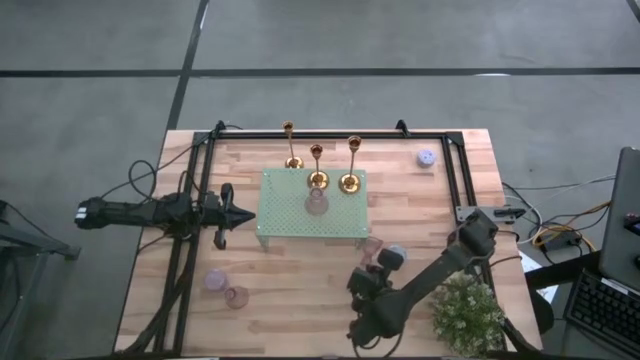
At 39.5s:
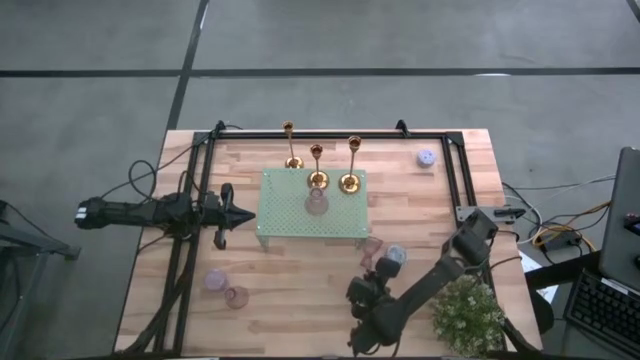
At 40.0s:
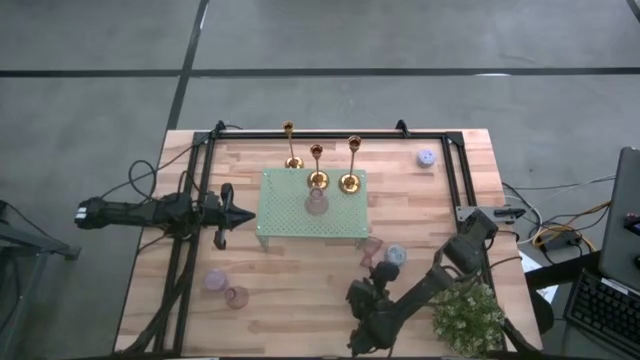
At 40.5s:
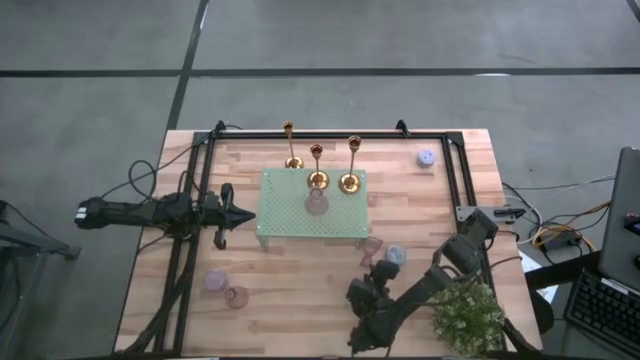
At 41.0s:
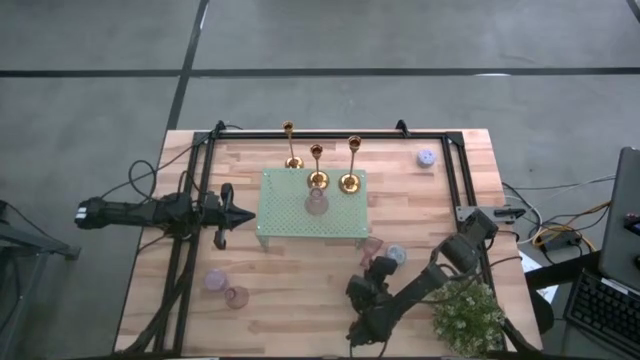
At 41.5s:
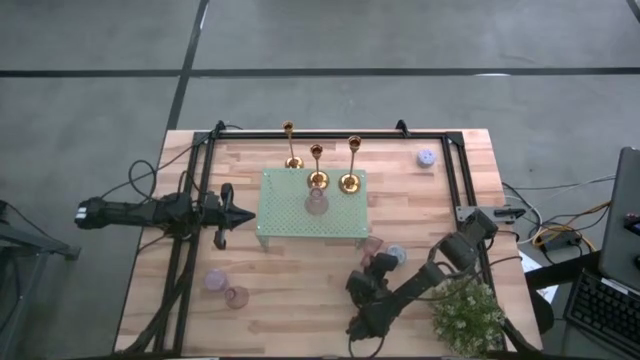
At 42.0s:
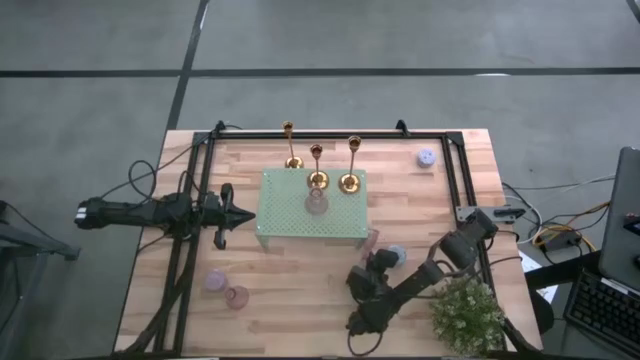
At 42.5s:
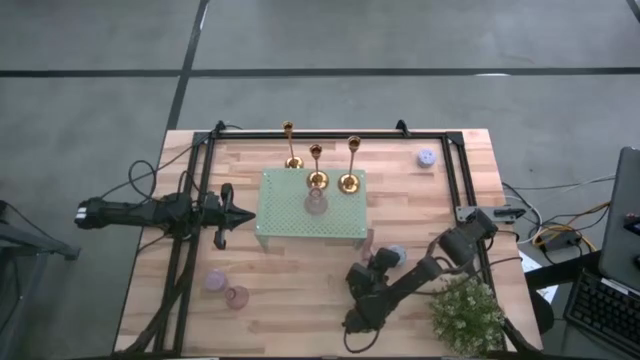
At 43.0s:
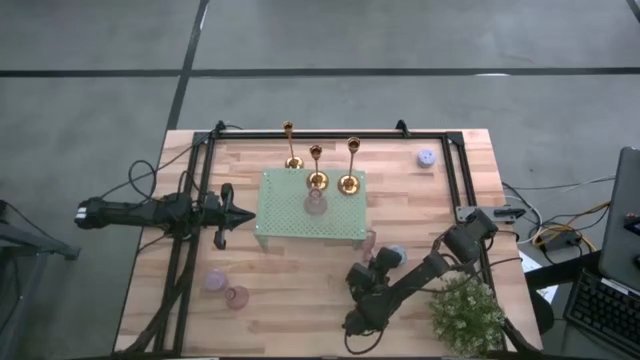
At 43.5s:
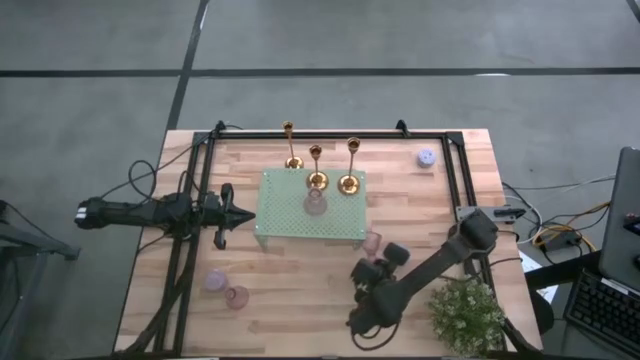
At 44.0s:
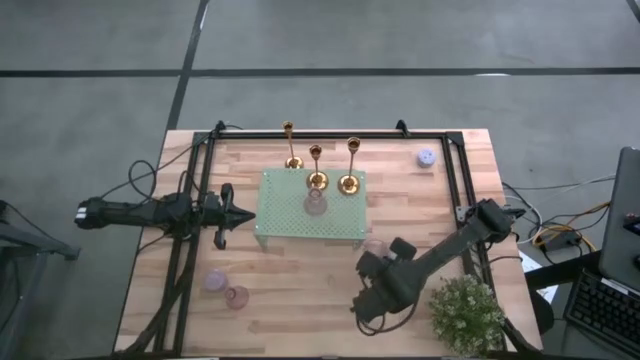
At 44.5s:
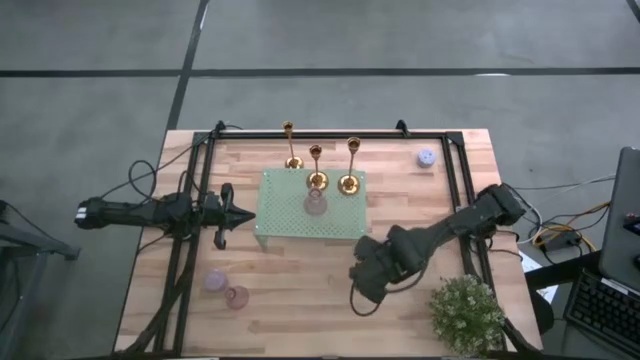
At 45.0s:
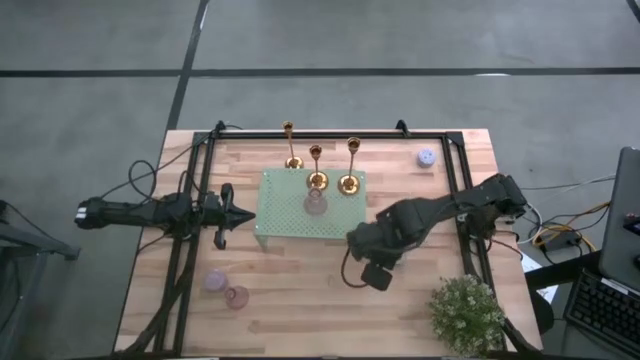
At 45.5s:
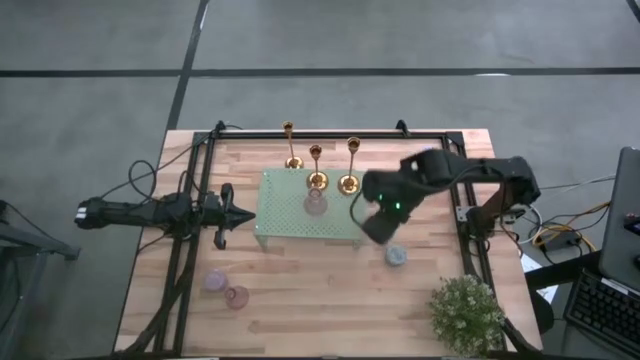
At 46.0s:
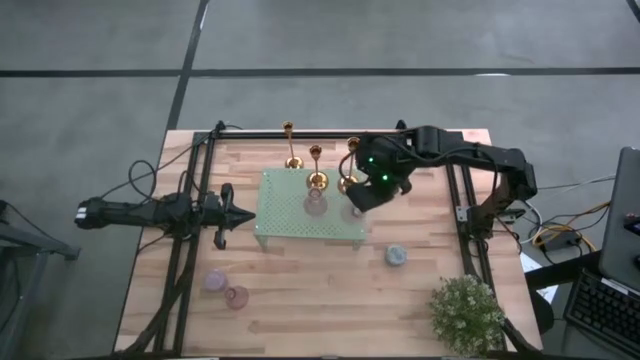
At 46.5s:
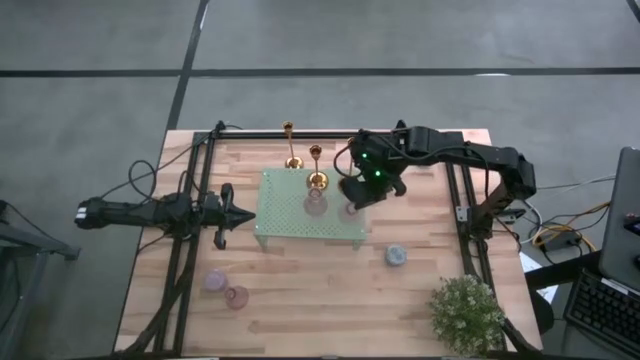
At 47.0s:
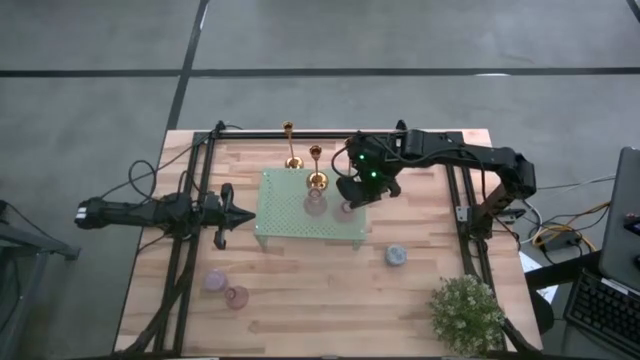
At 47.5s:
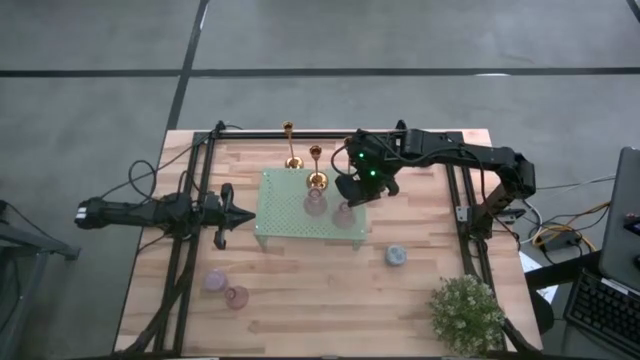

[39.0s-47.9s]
Task: Pick & Place candle stick holders
Put the right transparent glass candle holder on the shelf aligned with the other transparent glass candle holder

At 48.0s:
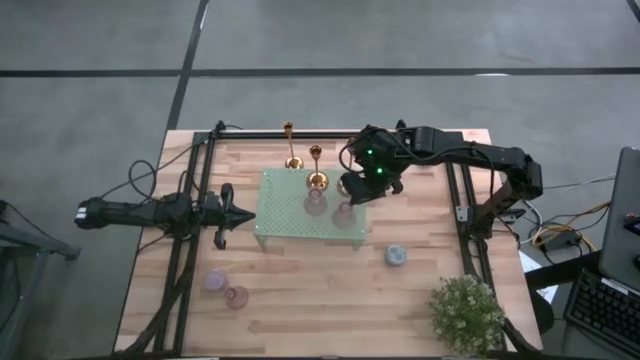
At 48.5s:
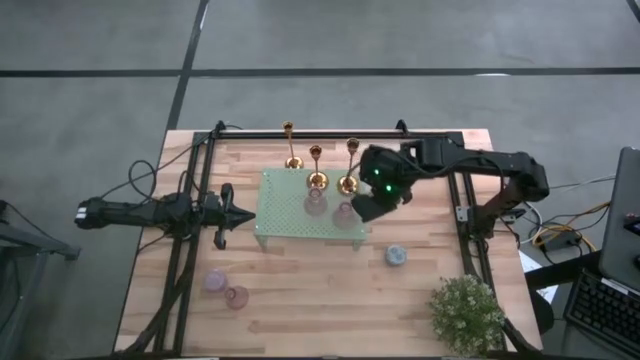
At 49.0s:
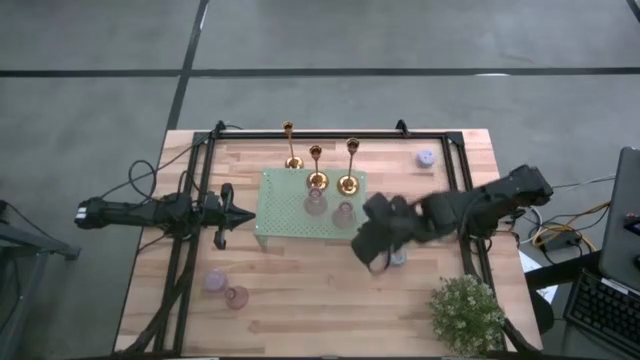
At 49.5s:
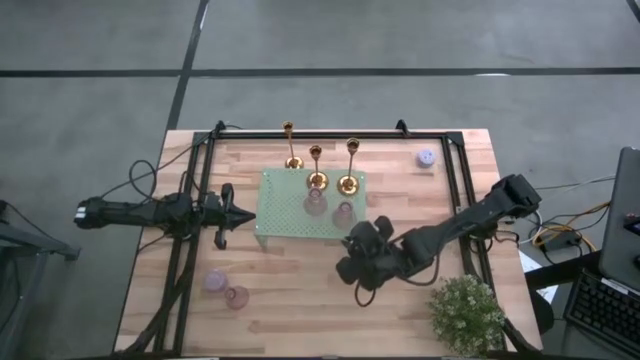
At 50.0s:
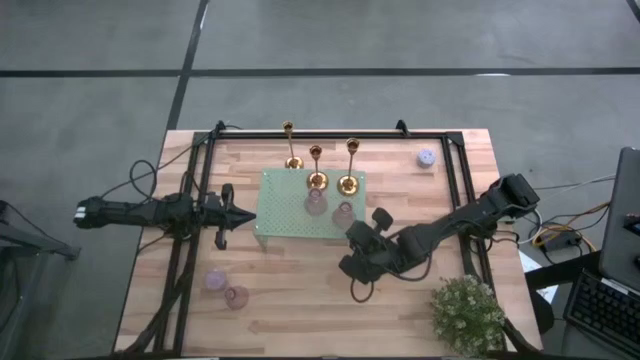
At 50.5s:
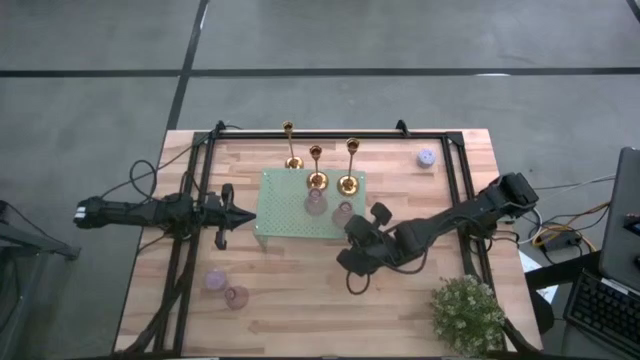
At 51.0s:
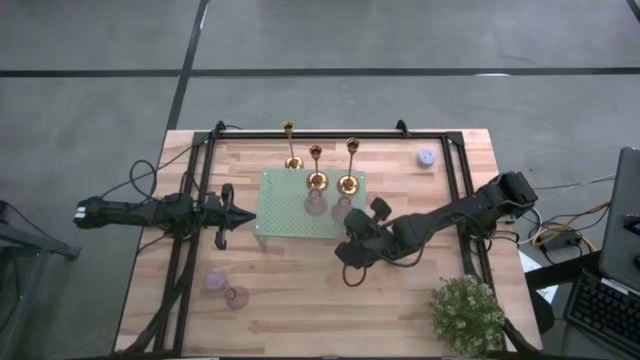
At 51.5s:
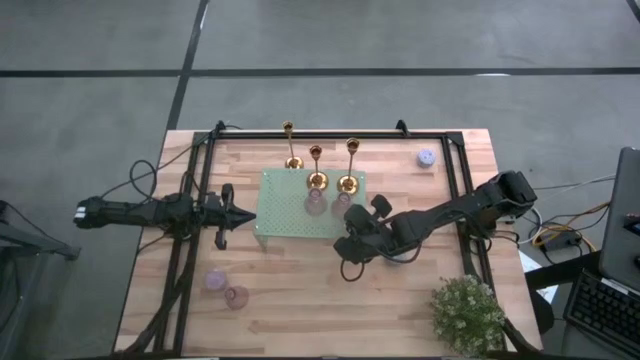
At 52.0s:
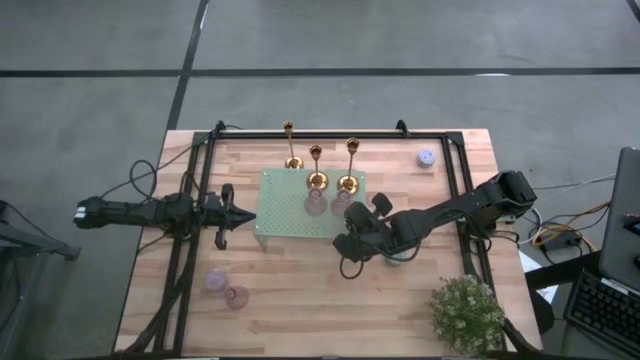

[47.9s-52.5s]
Adjust the left purple candle holder on the shelf

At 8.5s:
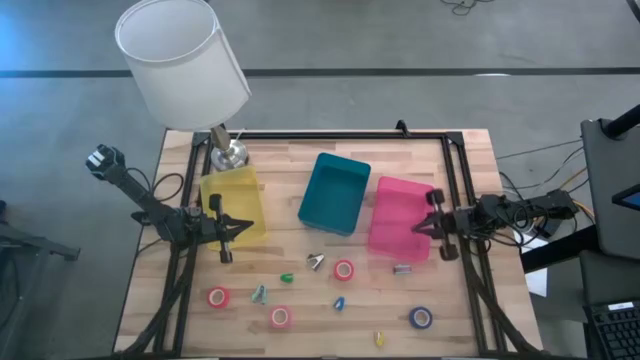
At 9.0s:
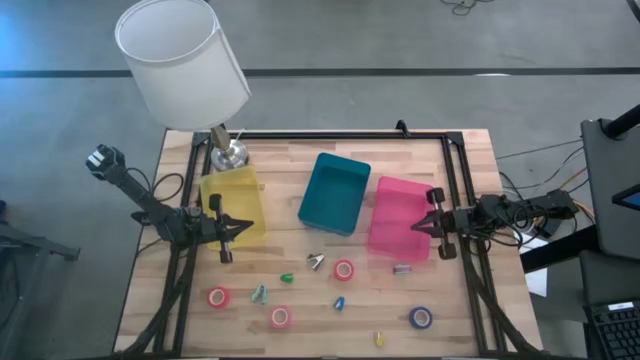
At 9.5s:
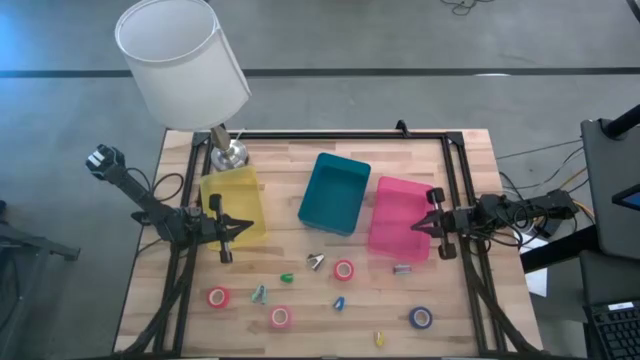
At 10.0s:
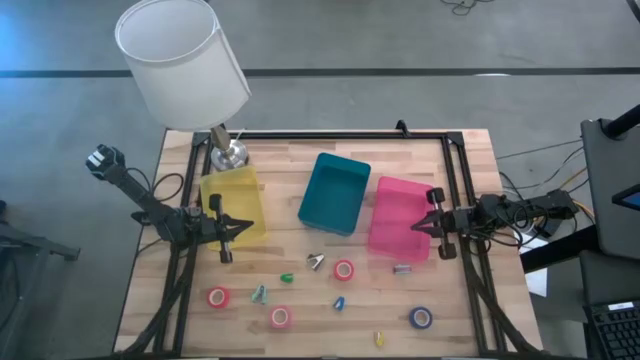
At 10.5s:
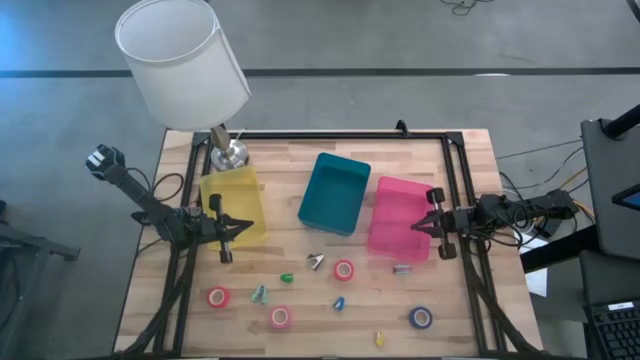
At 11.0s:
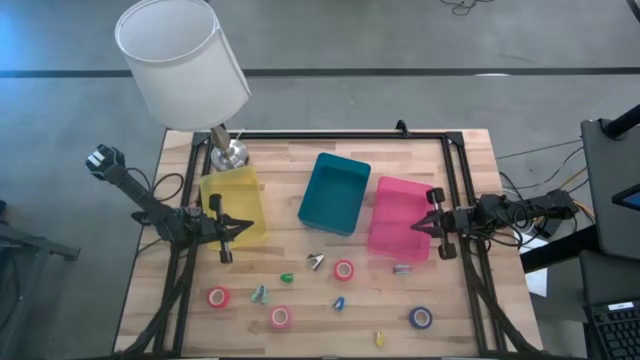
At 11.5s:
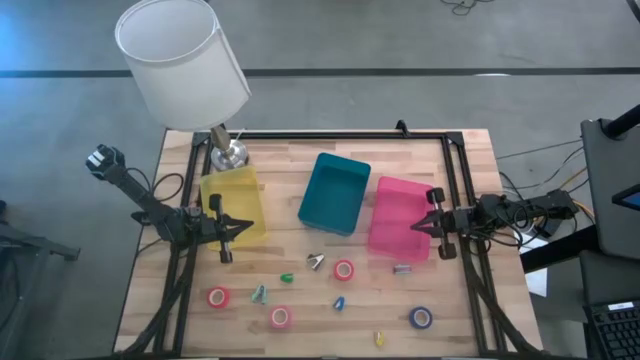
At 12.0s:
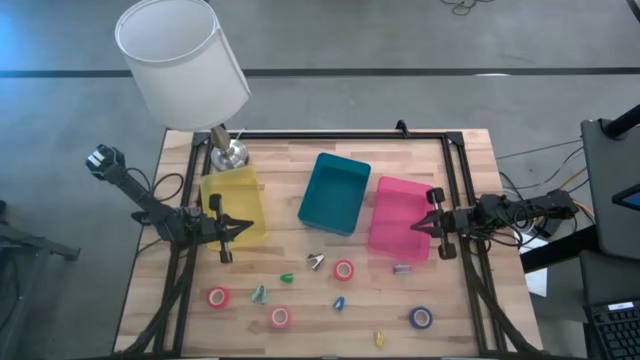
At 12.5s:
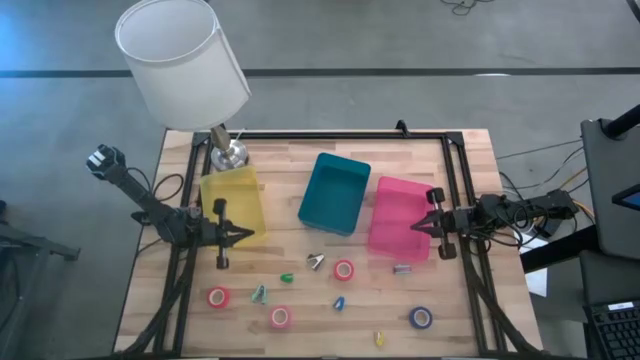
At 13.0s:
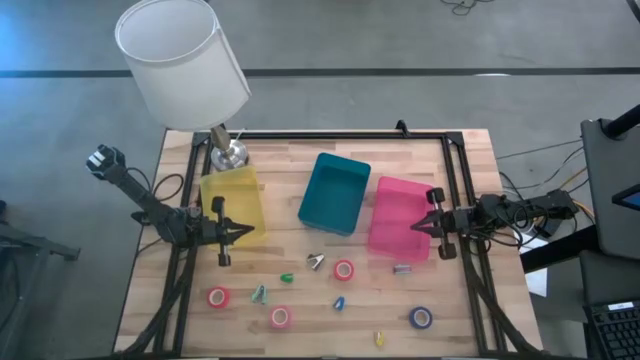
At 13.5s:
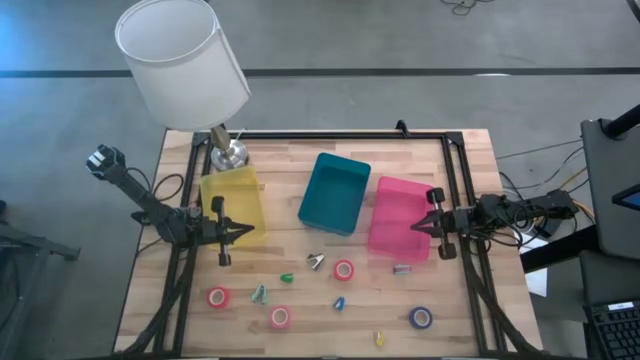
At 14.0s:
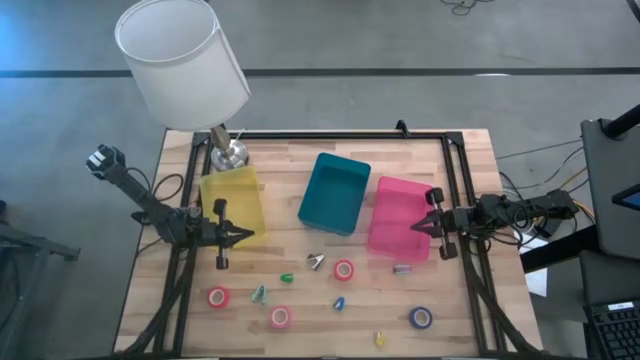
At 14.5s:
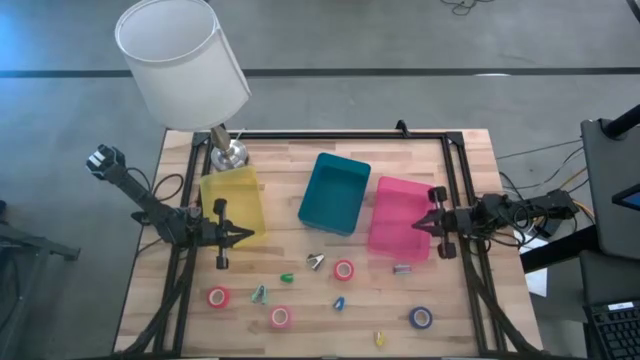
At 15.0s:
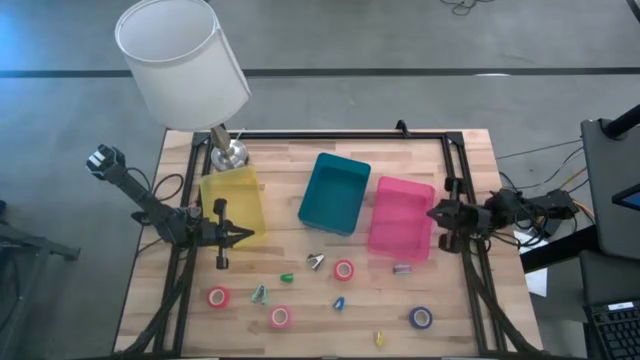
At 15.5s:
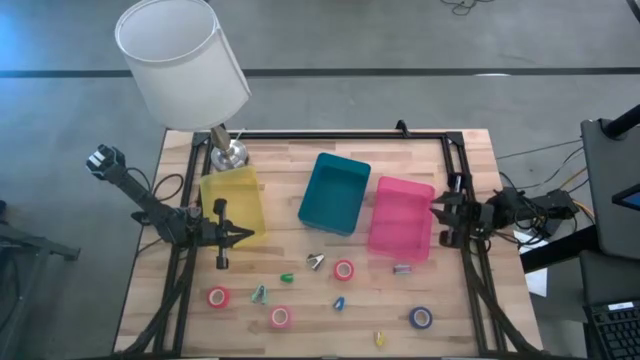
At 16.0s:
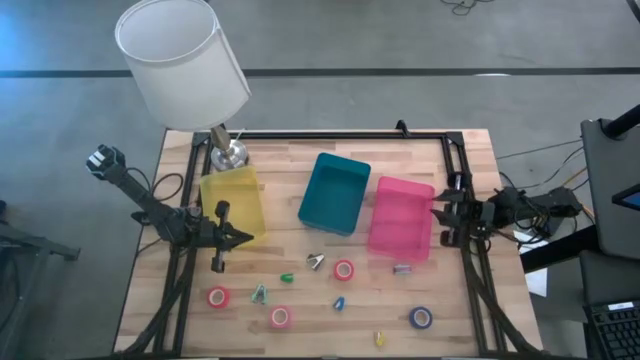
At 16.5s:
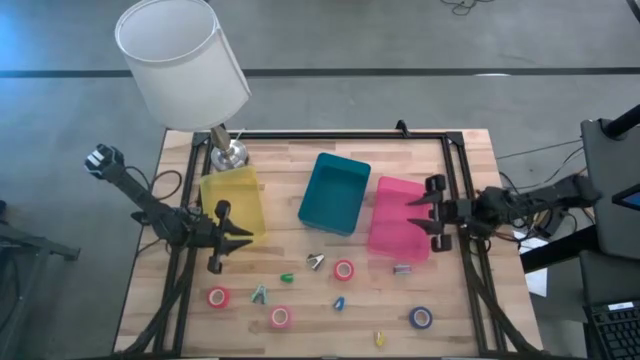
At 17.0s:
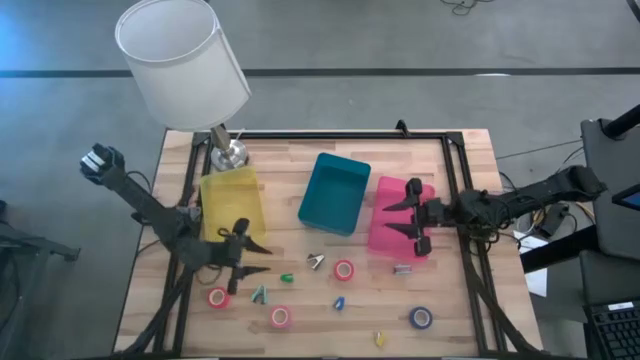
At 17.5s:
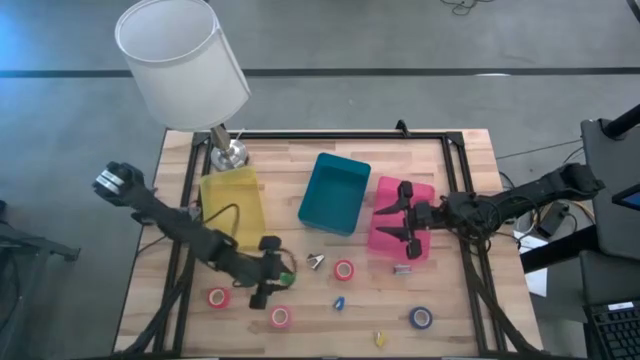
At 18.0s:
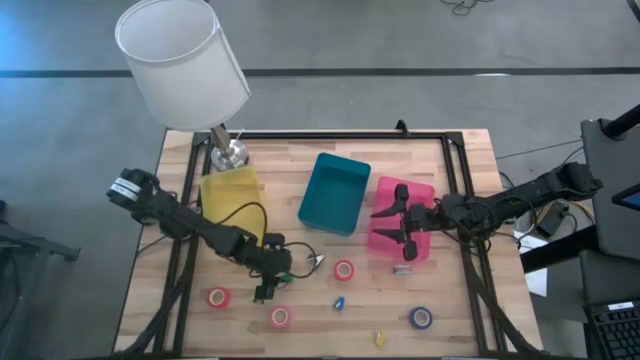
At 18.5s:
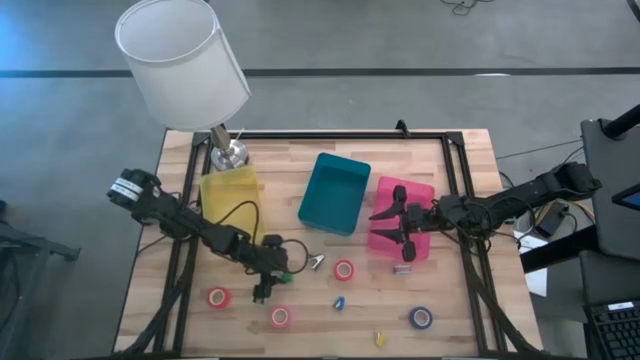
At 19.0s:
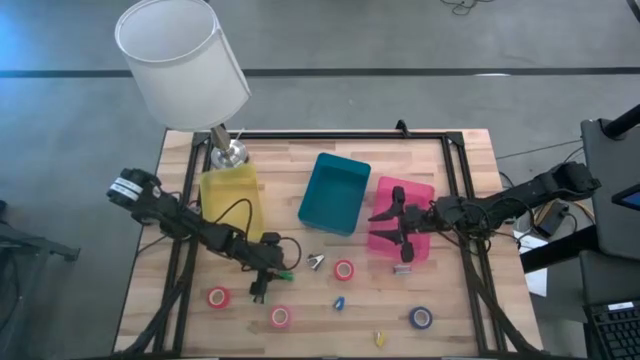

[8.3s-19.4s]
Task: Pick and place Stapler, Stapler remover, tape
Put the green stapler into the yellow bin
